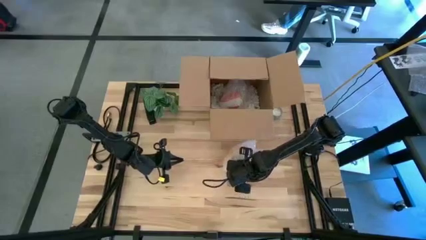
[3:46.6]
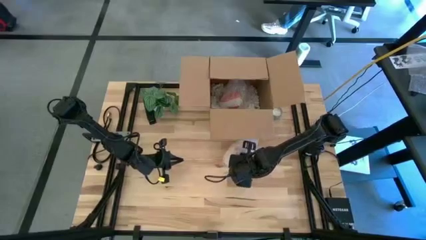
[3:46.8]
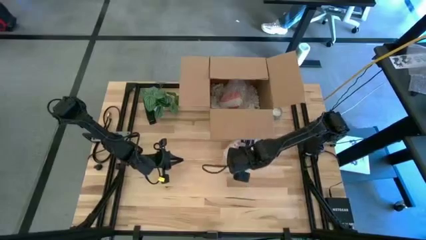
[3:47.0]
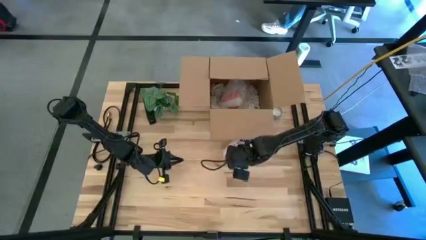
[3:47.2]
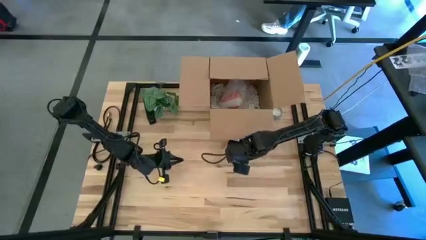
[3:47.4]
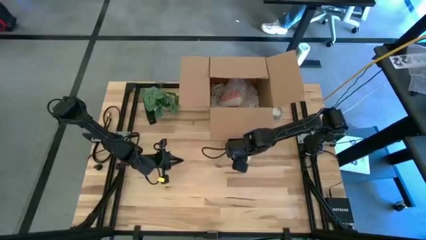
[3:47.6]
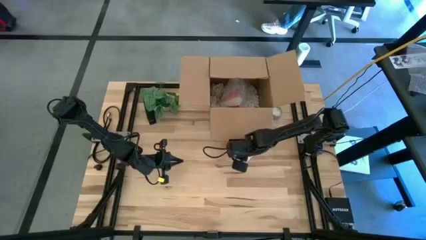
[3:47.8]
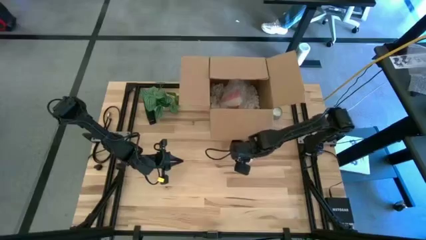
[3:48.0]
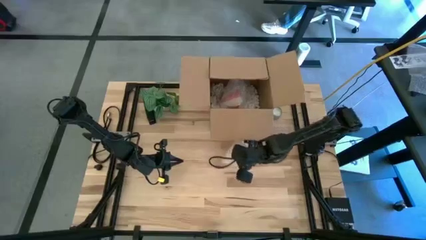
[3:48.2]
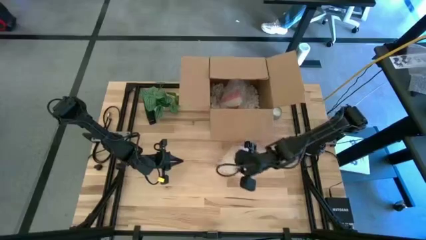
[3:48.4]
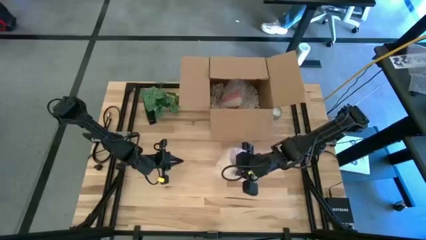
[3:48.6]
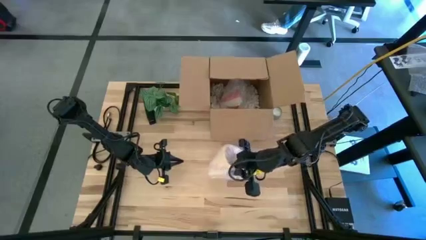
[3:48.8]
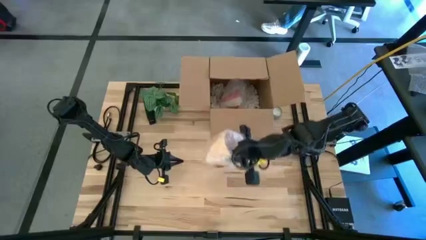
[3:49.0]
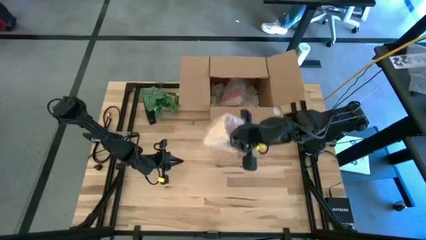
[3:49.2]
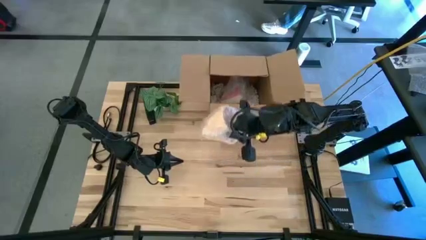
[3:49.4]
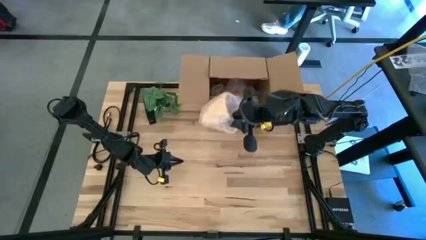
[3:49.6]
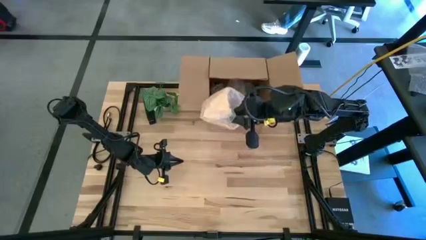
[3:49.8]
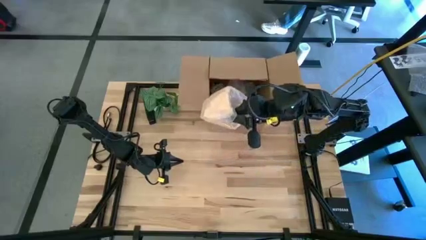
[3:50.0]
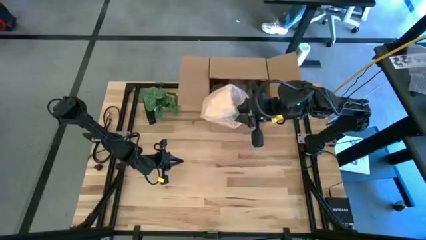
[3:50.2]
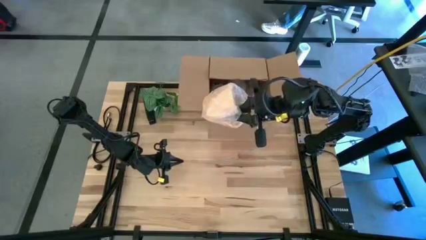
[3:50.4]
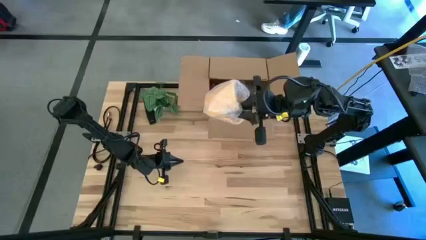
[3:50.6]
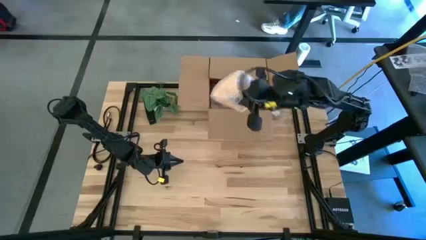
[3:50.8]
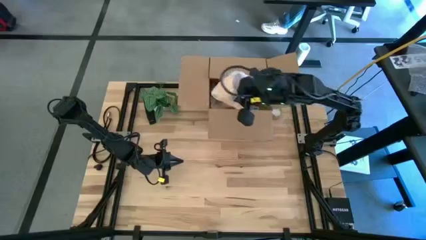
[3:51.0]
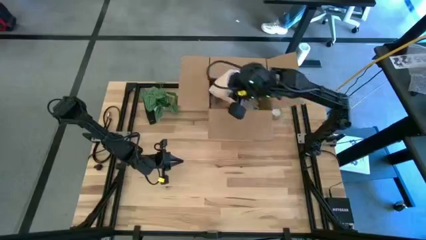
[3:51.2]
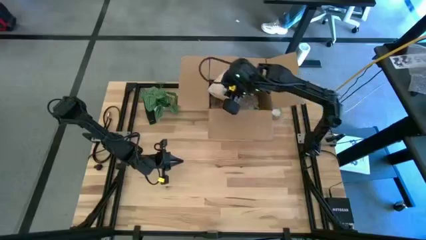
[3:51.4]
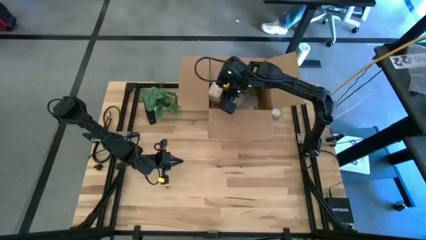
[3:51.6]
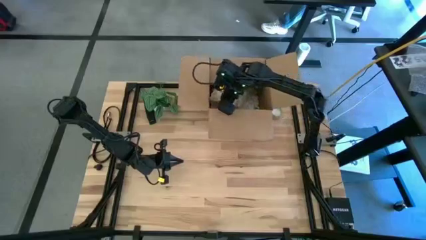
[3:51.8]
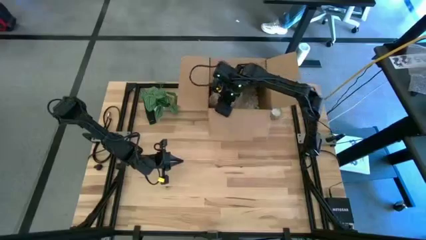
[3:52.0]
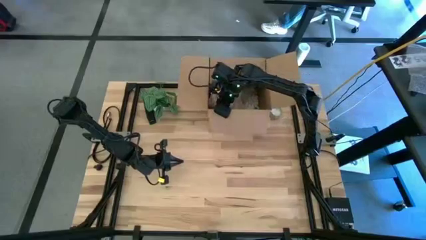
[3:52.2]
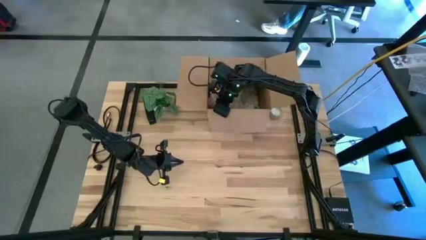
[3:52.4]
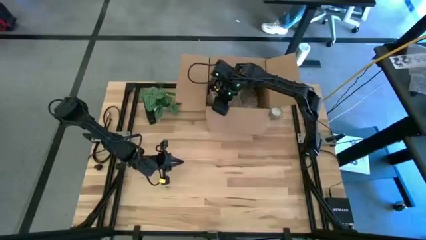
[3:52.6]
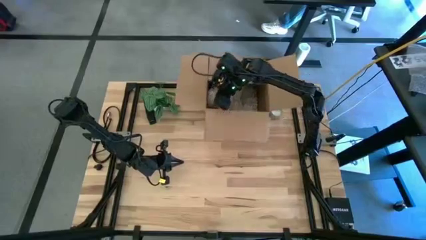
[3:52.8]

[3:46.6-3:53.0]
Task: wrap mug
Put the wrapped yellow mug into the cardboard box

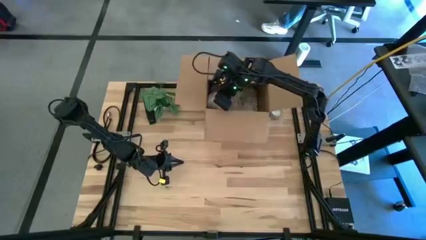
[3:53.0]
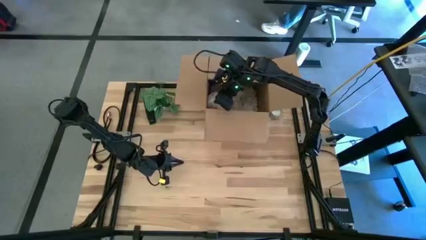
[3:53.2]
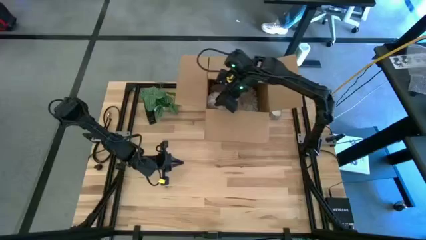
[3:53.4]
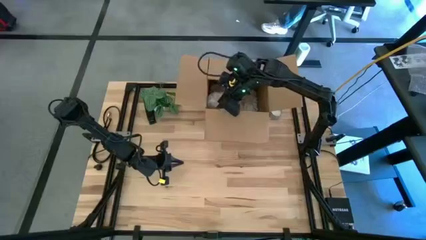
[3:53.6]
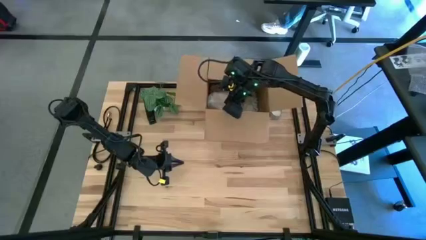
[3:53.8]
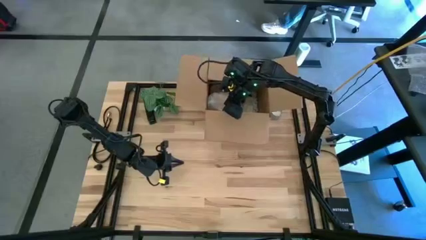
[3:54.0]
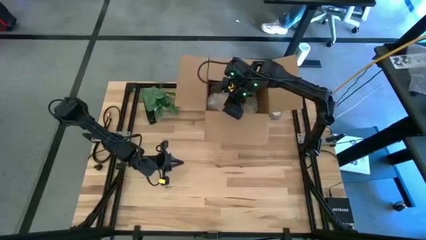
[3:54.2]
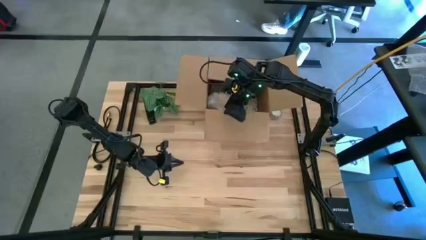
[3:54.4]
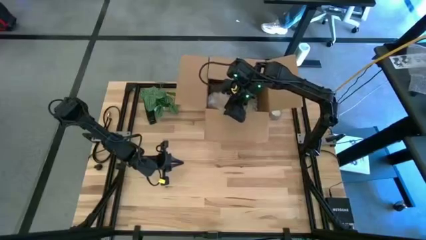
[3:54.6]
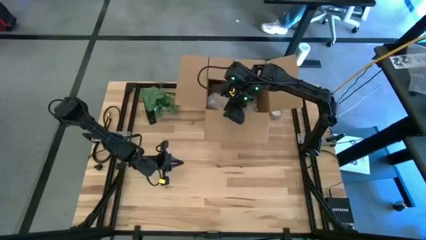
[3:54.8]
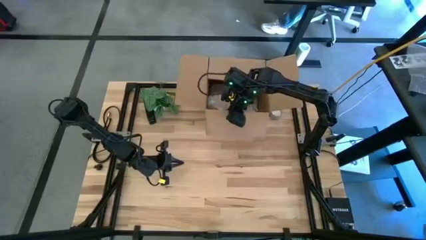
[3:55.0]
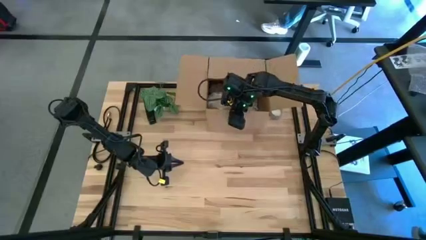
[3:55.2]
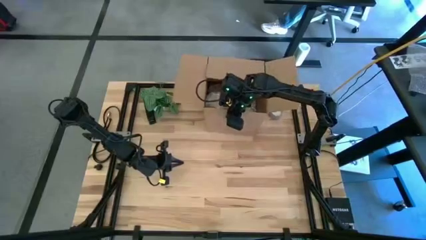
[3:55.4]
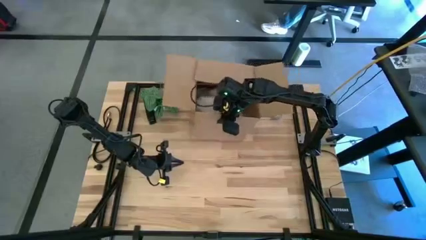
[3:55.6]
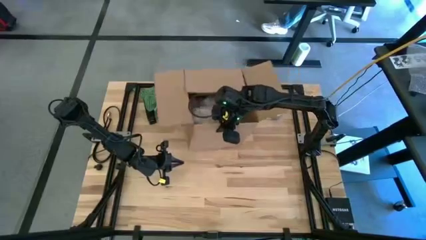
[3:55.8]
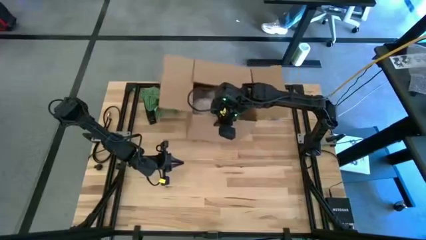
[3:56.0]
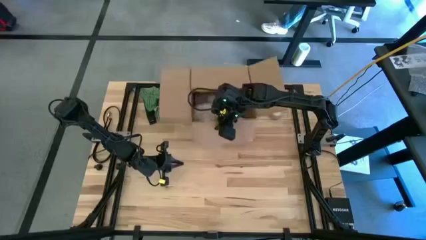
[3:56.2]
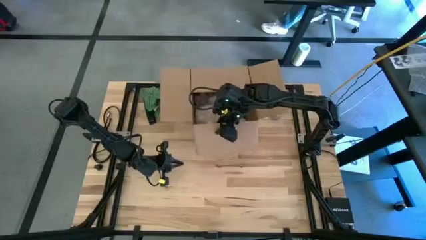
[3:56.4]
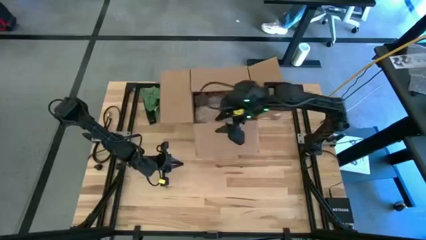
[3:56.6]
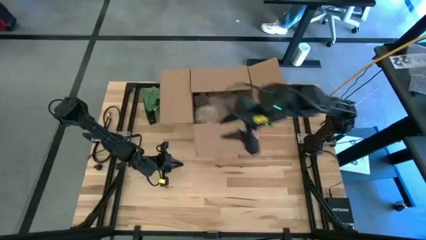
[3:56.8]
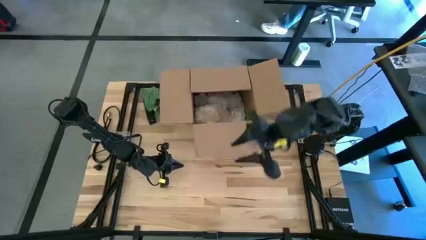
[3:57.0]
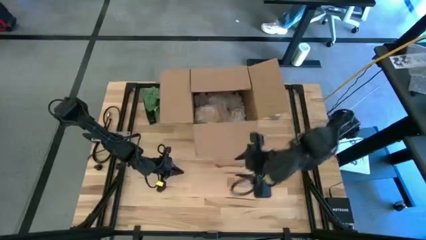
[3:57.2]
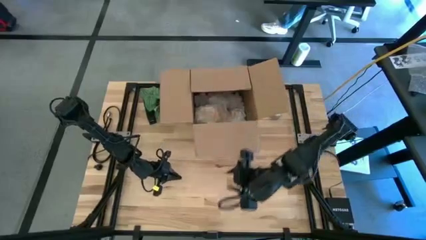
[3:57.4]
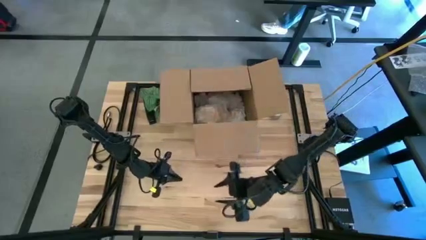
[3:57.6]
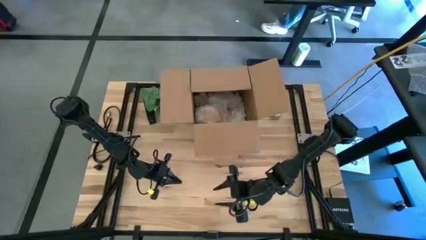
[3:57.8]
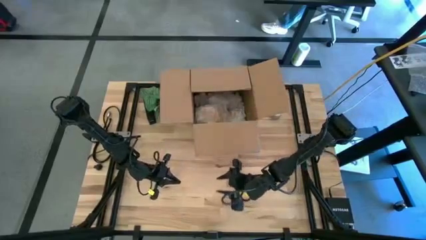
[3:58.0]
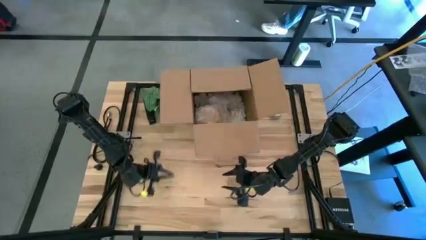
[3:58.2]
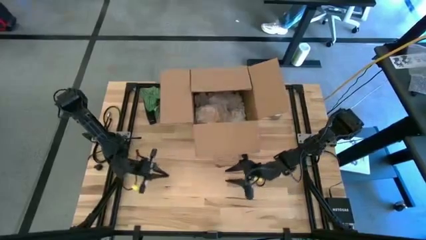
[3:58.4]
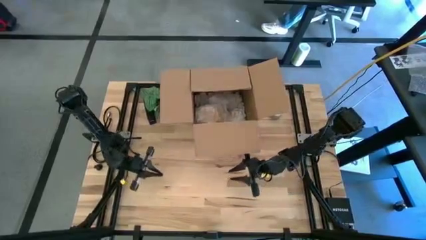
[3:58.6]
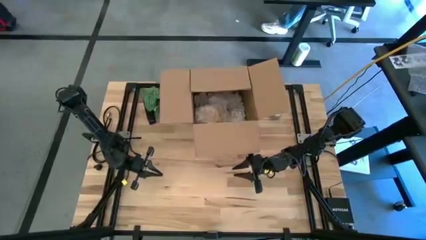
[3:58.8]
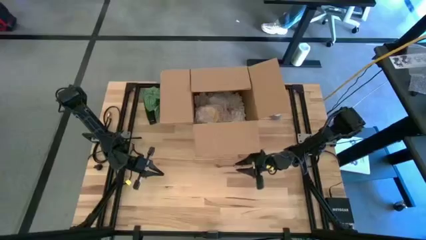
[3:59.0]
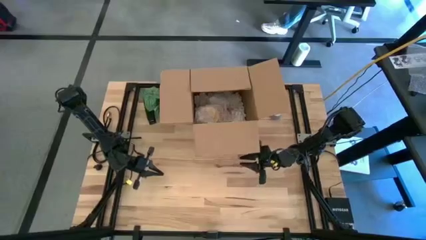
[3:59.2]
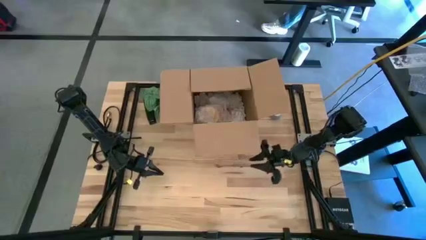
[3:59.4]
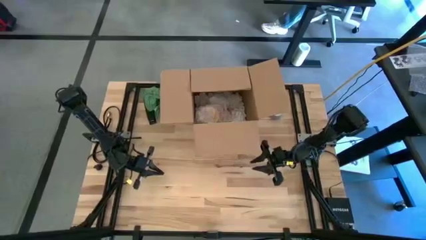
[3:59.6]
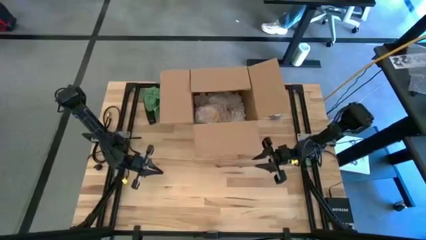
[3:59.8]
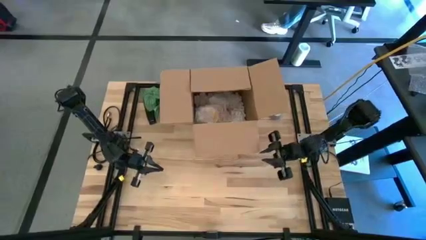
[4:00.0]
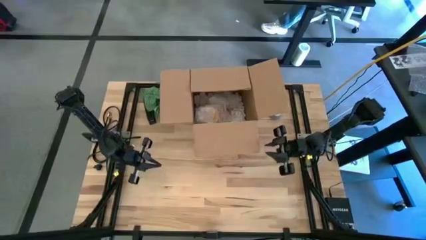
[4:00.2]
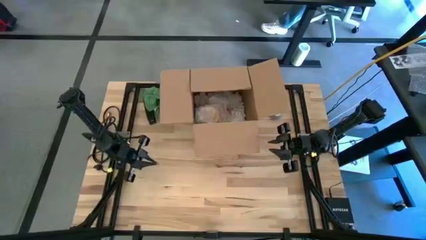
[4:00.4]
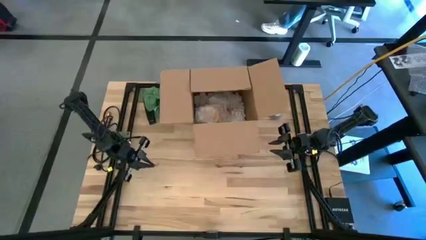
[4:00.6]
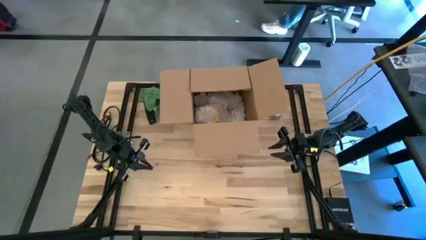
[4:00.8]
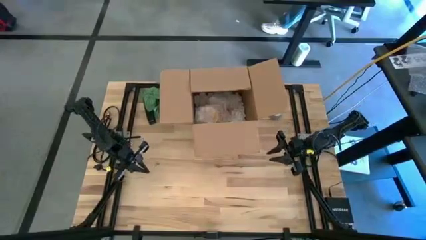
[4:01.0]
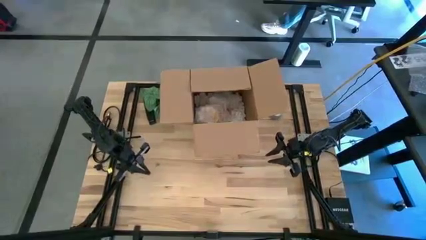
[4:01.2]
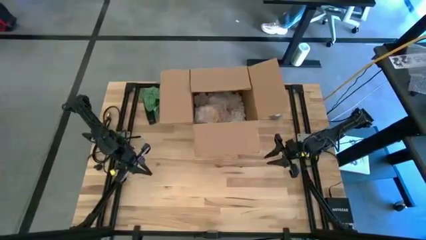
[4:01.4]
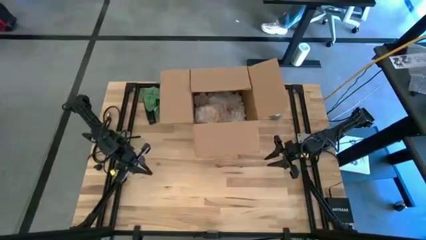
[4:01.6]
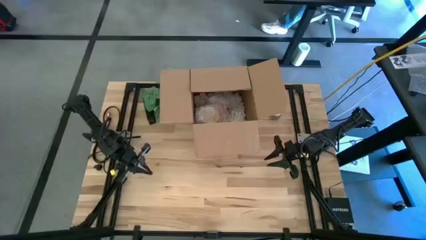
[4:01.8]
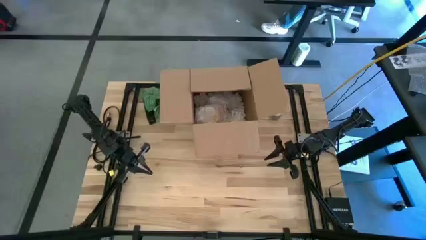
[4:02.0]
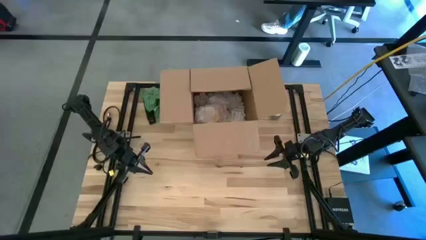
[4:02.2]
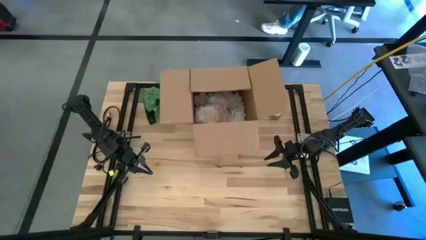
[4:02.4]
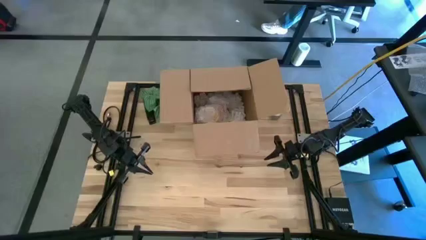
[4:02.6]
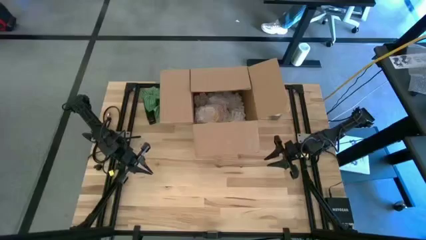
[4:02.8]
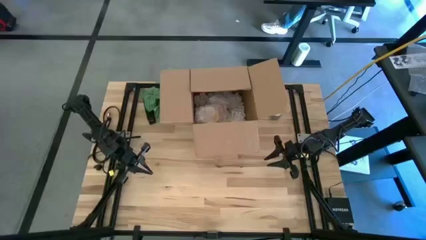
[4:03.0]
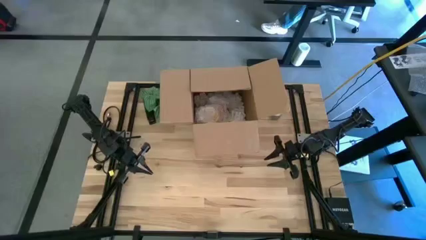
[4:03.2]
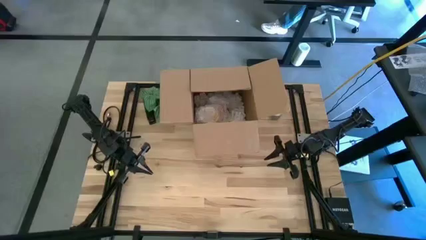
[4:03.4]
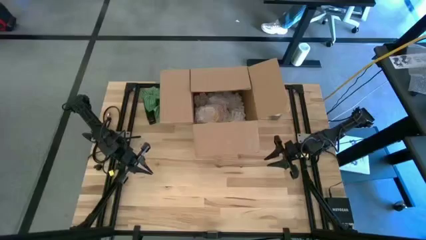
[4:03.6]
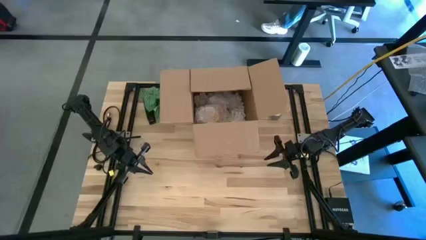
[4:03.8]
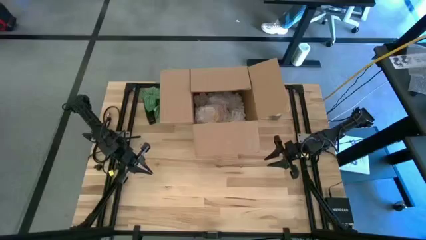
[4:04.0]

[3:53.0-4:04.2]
Return to Home Position
